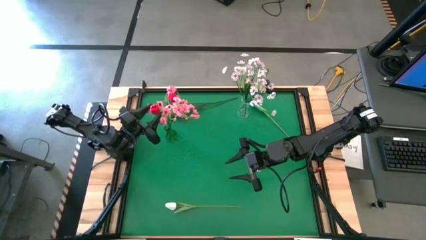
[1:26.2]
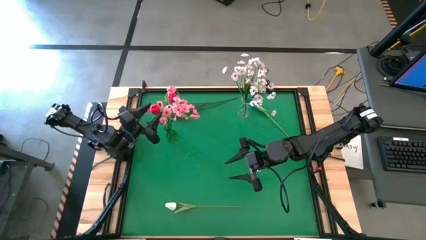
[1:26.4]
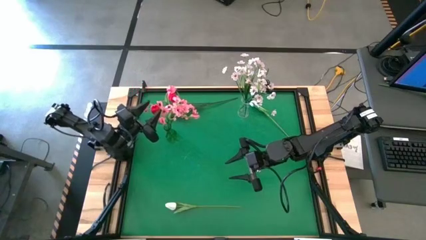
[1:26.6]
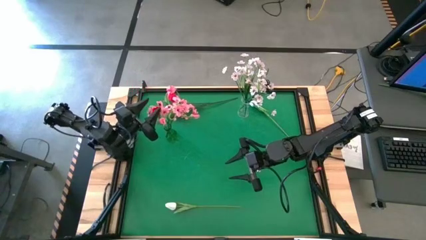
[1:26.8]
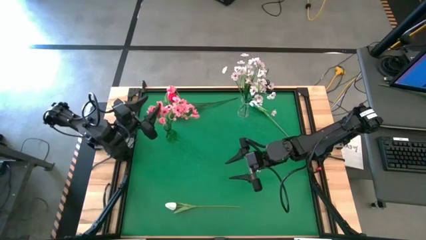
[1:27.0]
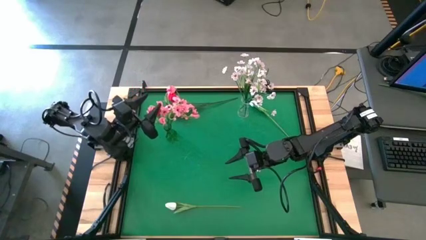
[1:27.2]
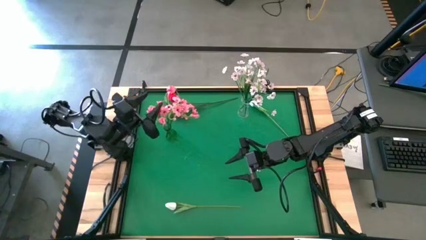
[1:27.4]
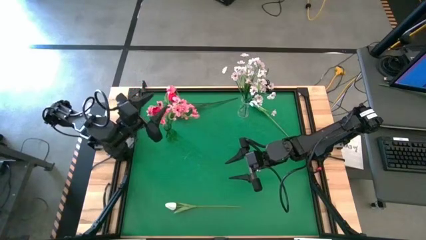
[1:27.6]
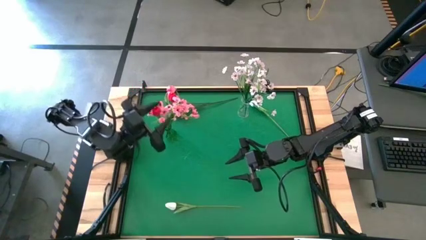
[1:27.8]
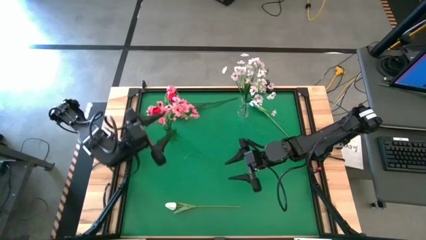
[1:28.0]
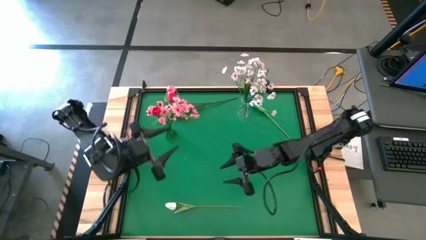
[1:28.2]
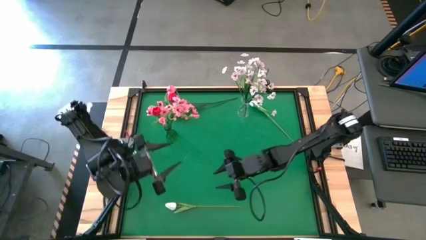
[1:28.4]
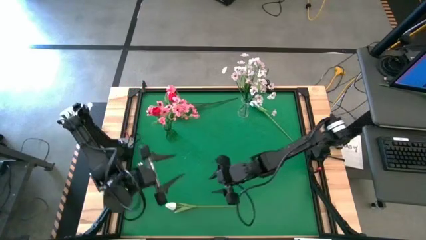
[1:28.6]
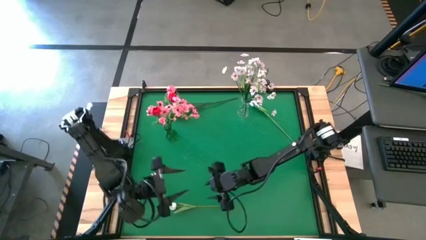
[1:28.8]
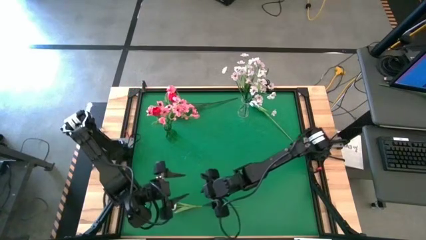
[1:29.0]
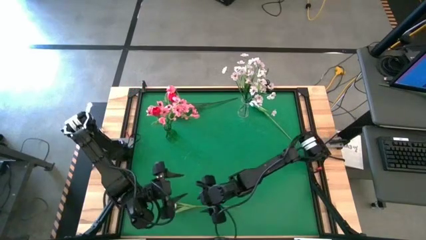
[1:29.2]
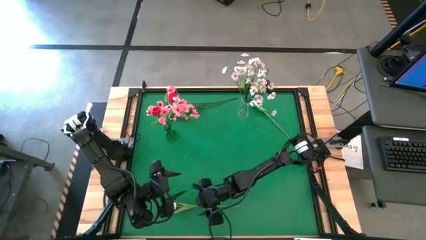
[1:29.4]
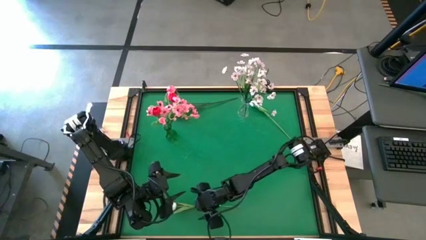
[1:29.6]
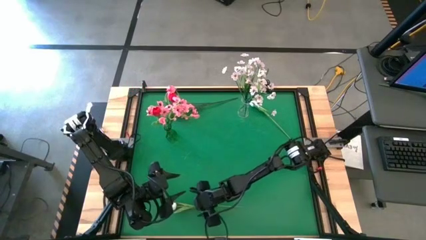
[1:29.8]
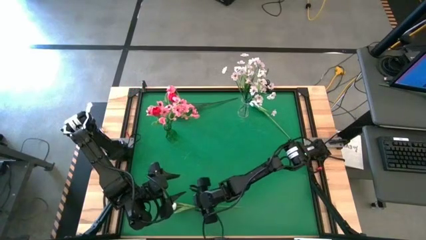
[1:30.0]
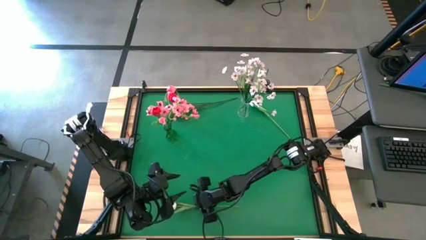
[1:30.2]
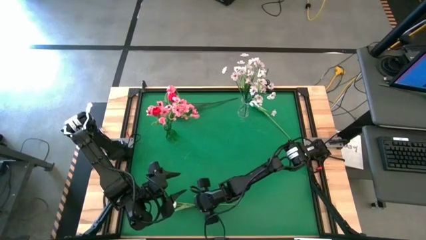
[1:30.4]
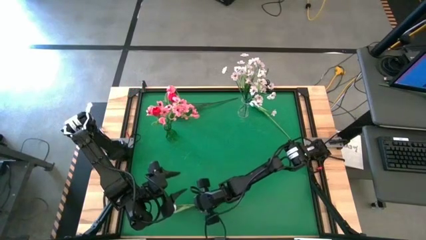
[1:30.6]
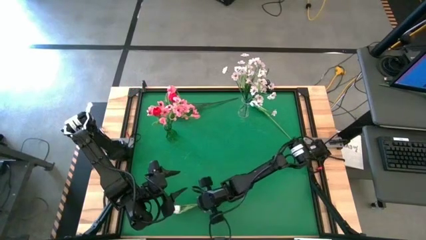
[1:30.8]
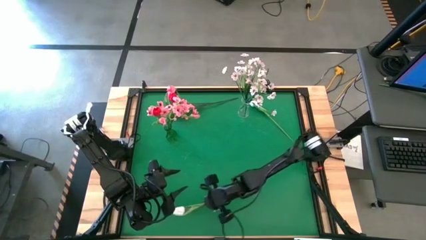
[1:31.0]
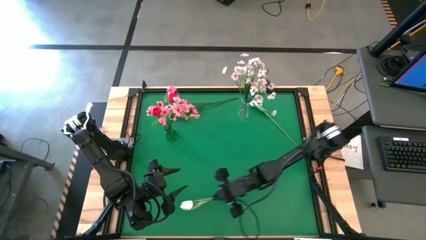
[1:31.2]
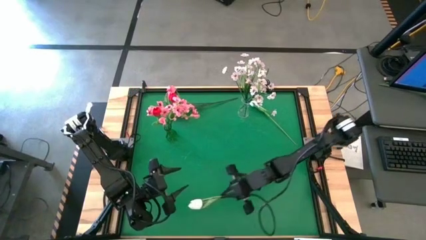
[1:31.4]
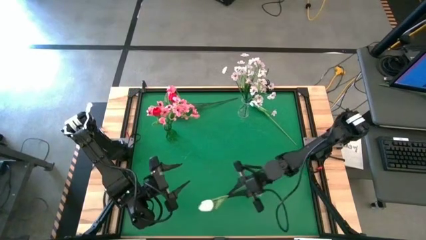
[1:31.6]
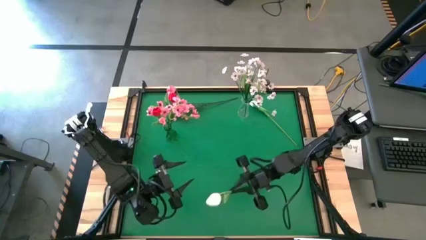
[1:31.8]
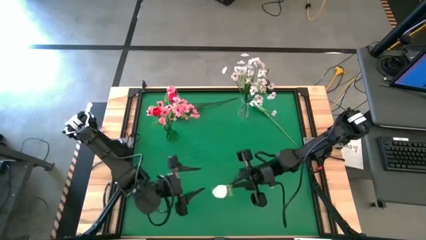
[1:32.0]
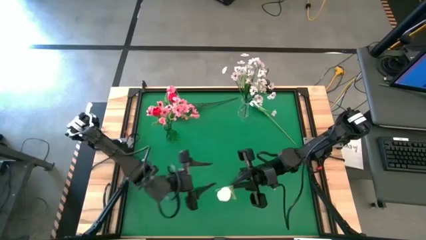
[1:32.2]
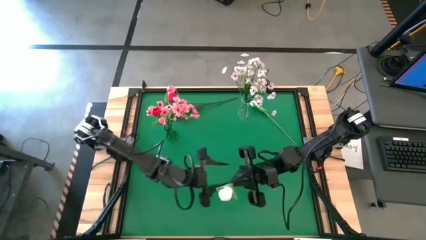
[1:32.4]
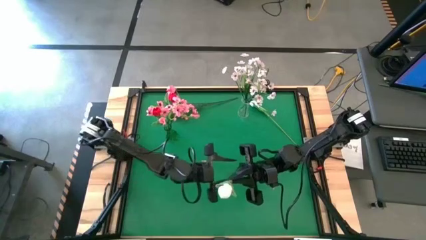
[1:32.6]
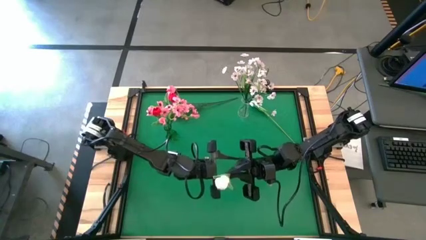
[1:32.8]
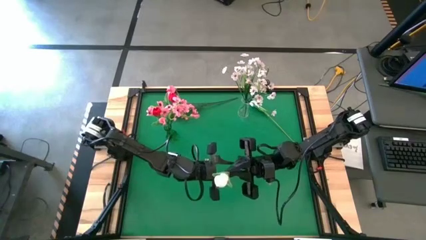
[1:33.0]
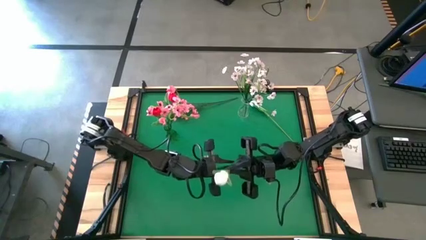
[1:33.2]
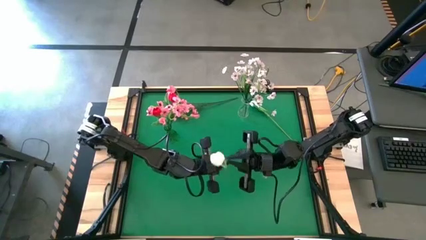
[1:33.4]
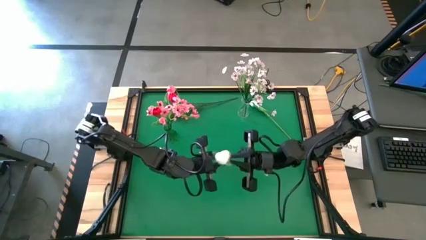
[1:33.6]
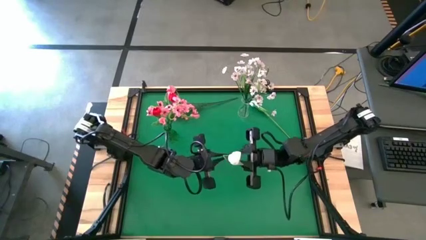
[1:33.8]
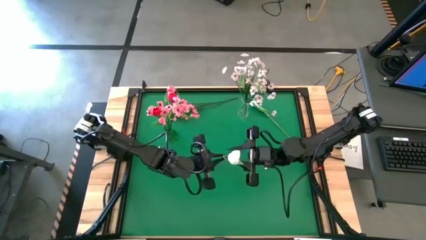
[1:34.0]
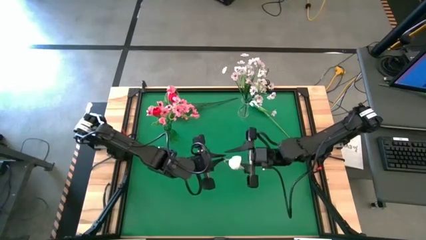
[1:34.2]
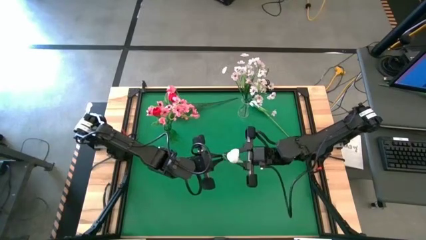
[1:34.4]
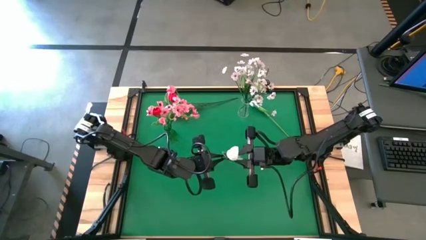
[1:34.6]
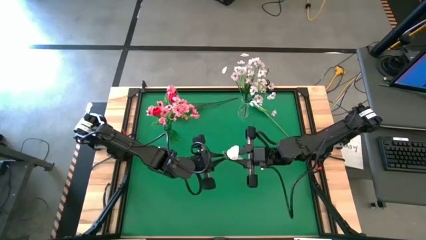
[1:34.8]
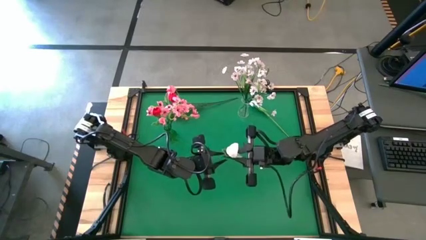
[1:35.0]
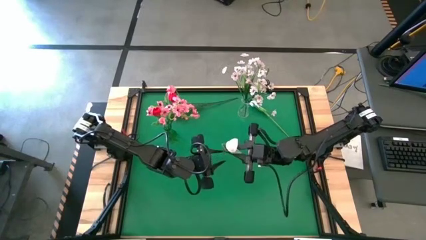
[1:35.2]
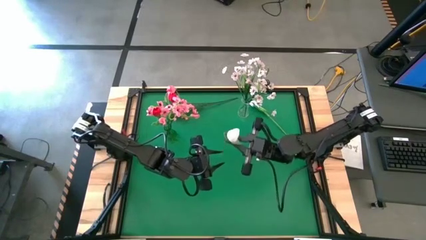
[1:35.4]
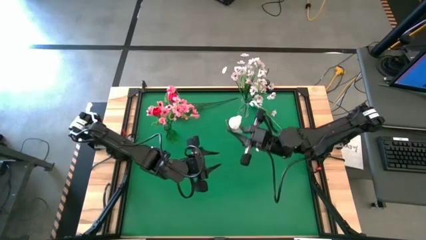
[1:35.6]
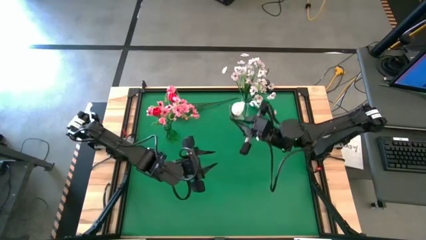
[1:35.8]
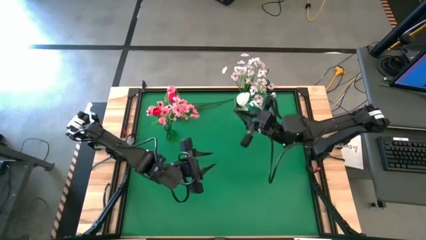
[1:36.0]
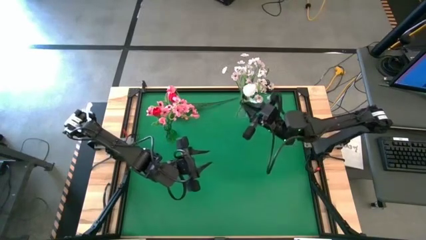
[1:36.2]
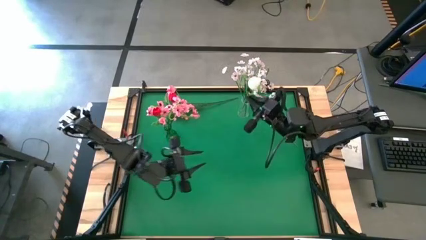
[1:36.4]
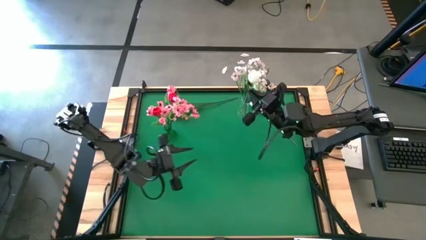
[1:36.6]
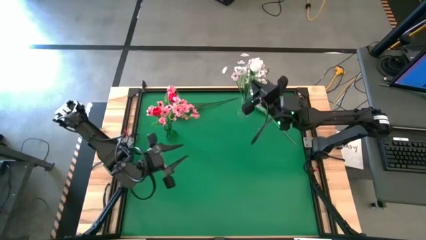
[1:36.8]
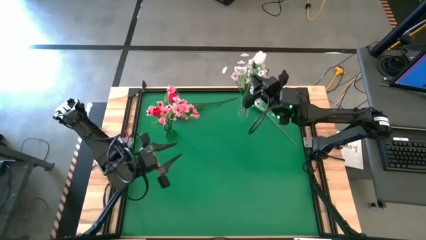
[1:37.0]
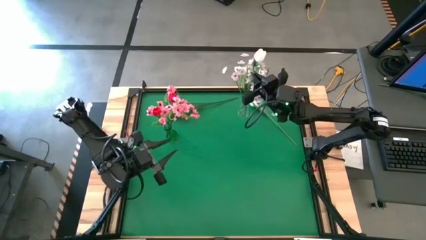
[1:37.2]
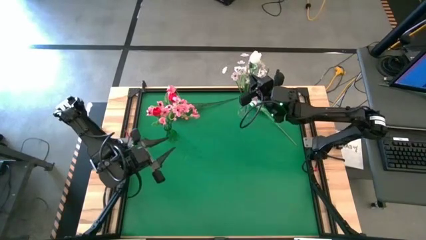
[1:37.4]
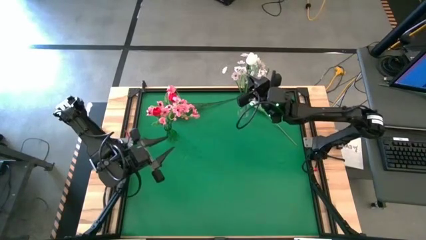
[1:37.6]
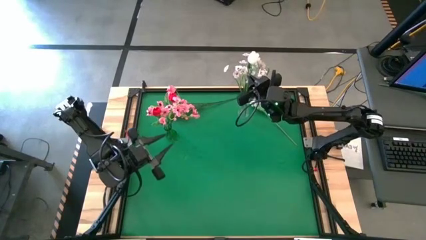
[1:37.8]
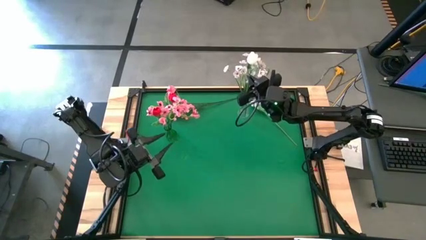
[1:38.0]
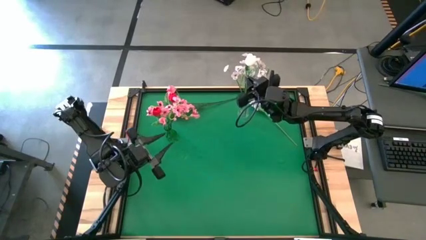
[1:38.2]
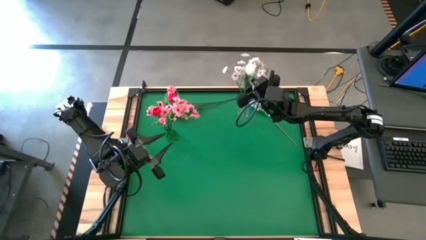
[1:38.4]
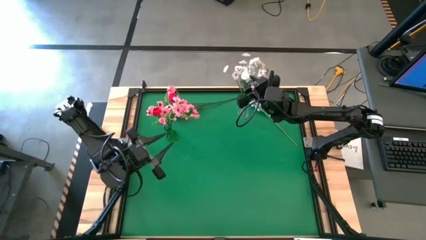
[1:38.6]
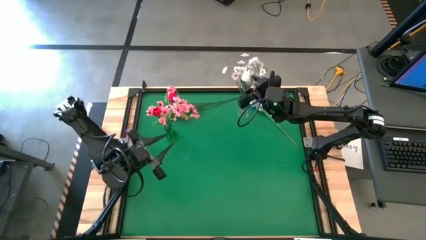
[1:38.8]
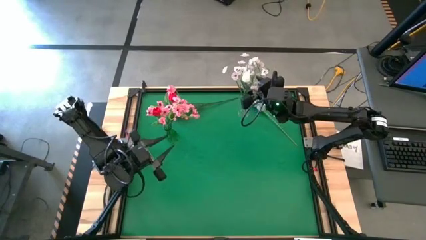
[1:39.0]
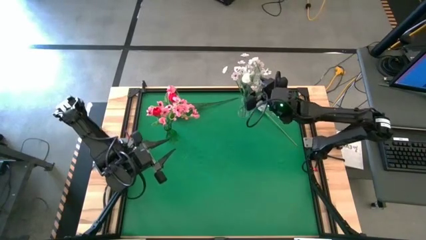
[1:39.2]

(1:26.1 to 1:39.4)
Task: Sort flowers into vase by color
Put the bottom white flower into the transparent vase
